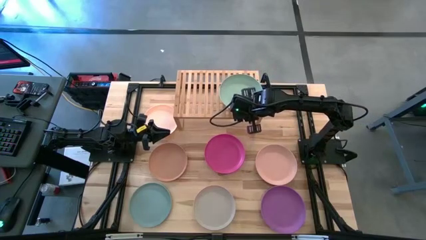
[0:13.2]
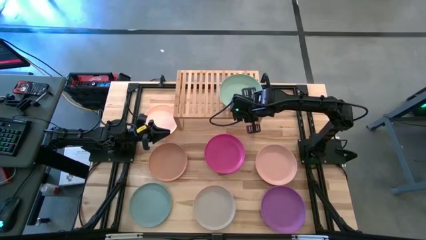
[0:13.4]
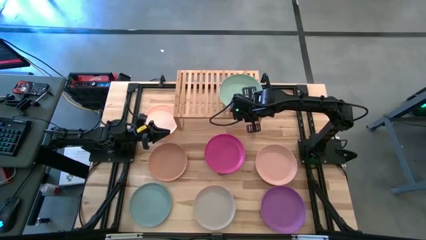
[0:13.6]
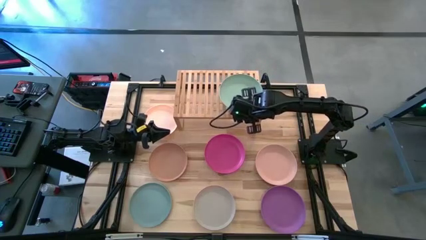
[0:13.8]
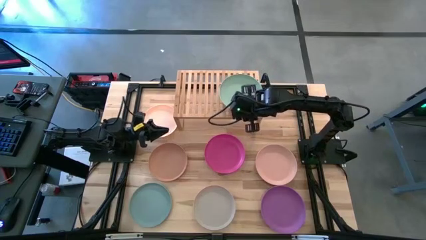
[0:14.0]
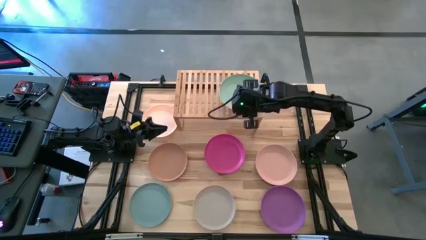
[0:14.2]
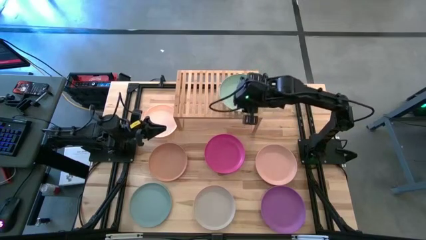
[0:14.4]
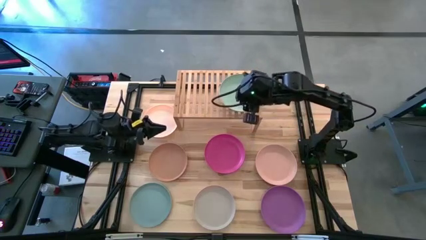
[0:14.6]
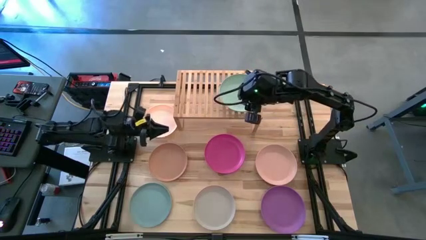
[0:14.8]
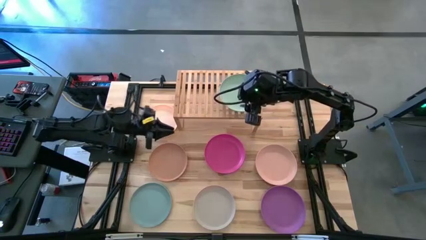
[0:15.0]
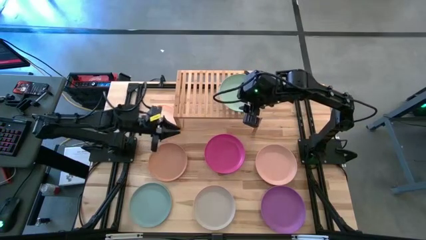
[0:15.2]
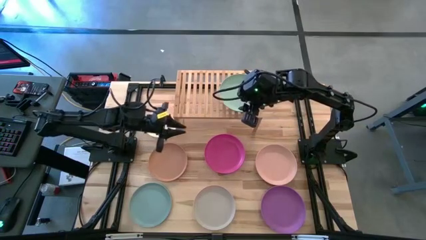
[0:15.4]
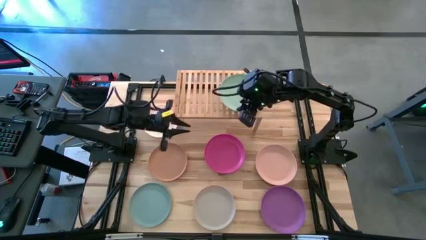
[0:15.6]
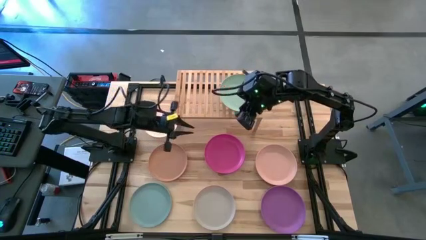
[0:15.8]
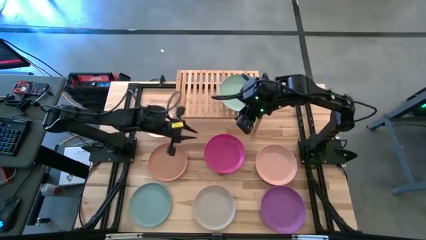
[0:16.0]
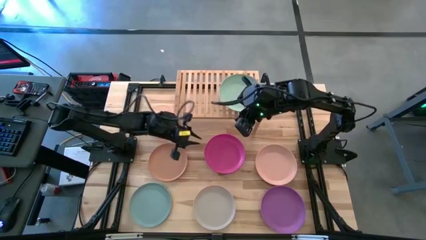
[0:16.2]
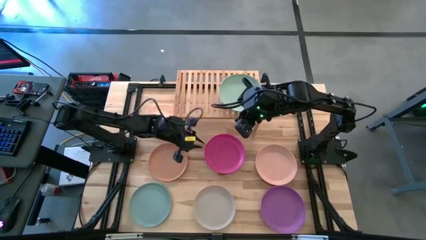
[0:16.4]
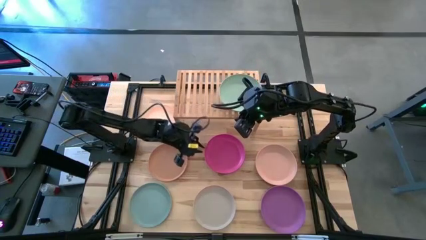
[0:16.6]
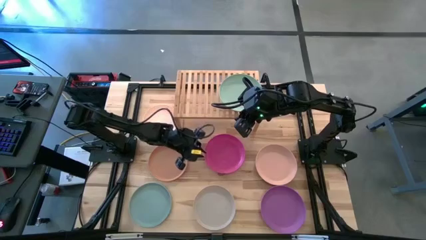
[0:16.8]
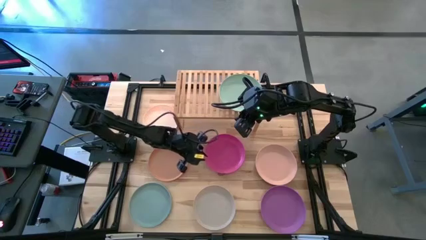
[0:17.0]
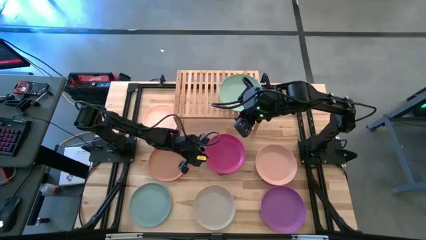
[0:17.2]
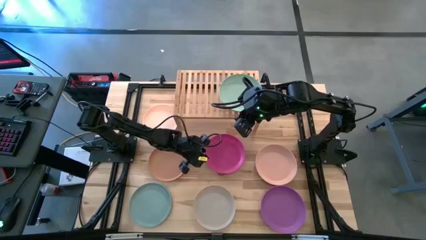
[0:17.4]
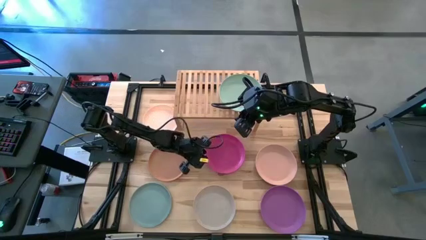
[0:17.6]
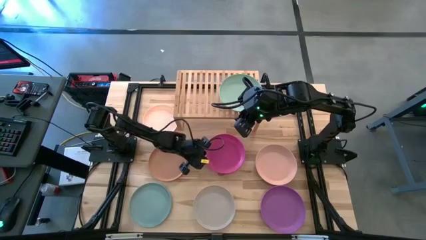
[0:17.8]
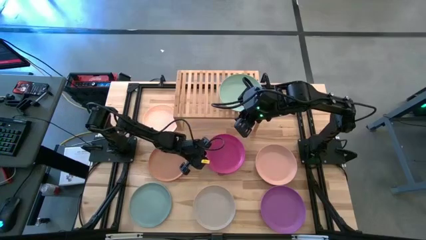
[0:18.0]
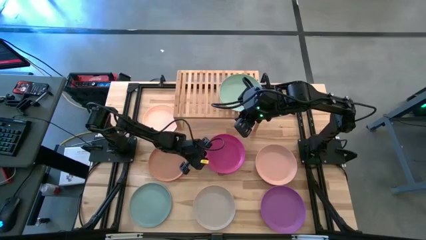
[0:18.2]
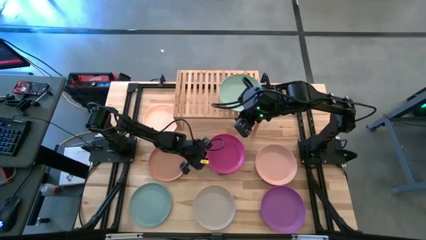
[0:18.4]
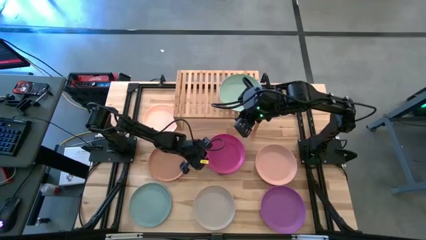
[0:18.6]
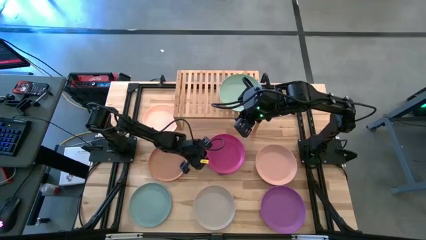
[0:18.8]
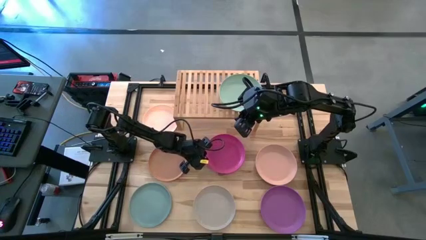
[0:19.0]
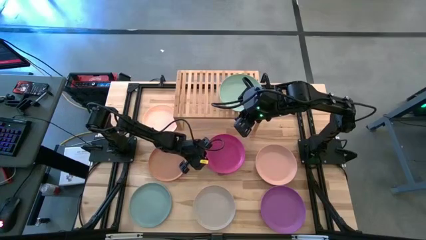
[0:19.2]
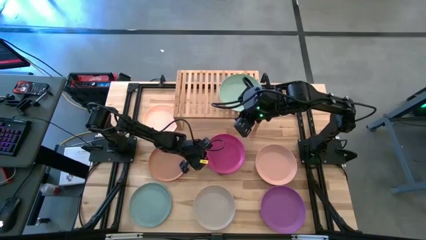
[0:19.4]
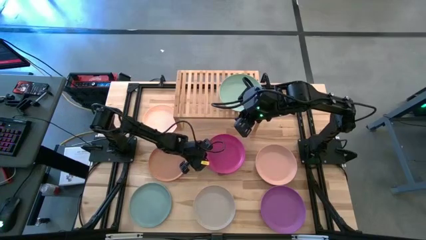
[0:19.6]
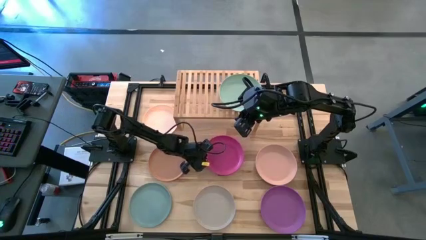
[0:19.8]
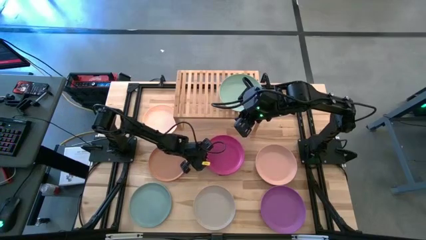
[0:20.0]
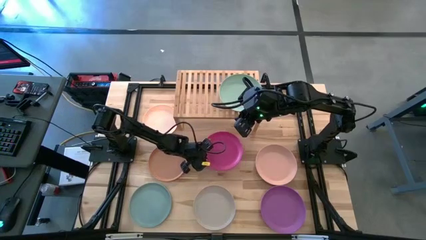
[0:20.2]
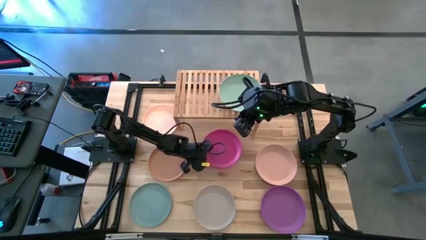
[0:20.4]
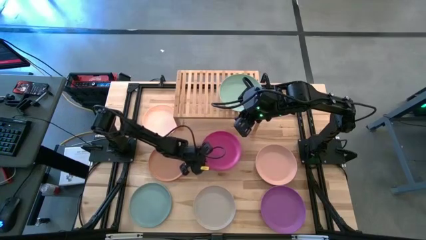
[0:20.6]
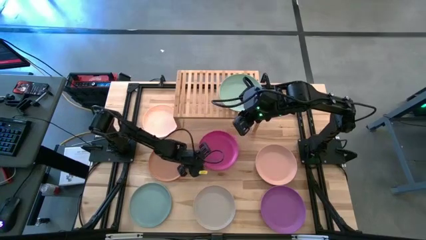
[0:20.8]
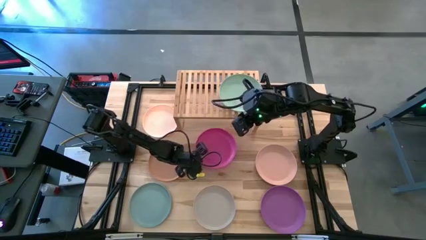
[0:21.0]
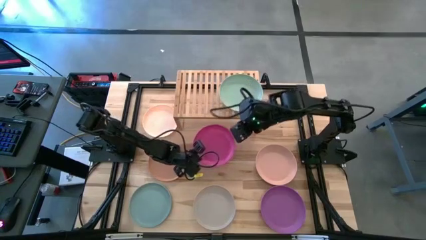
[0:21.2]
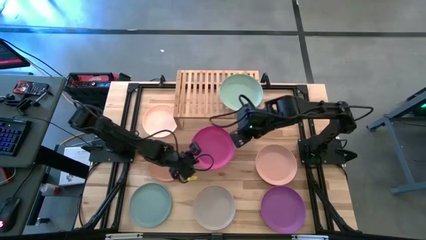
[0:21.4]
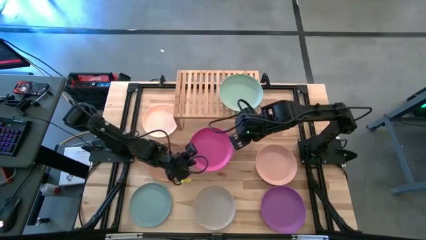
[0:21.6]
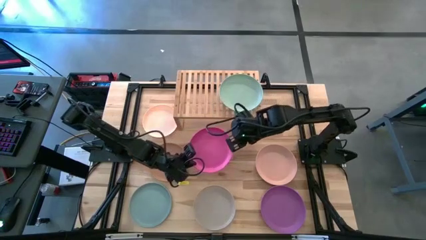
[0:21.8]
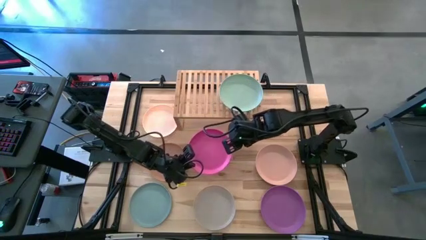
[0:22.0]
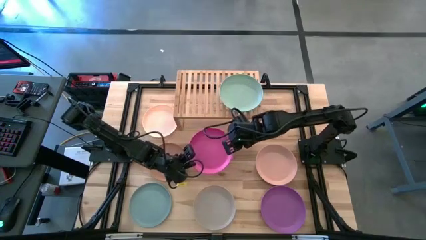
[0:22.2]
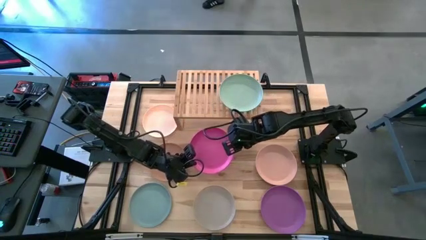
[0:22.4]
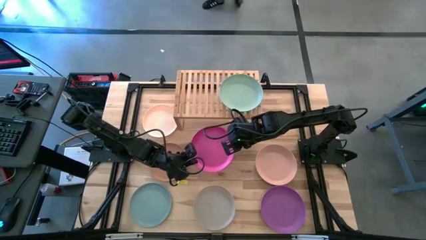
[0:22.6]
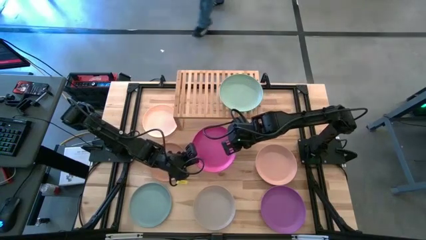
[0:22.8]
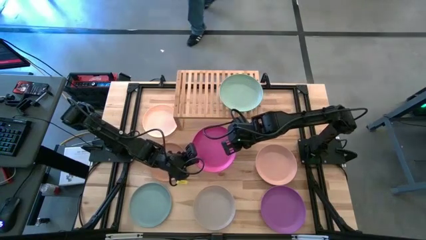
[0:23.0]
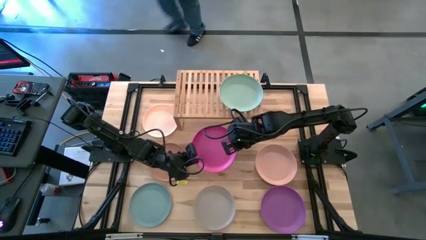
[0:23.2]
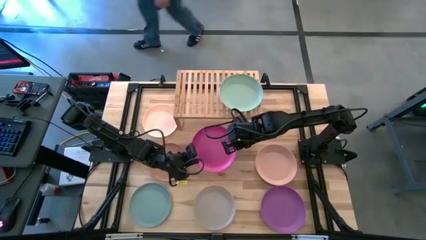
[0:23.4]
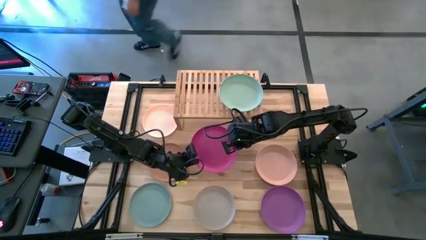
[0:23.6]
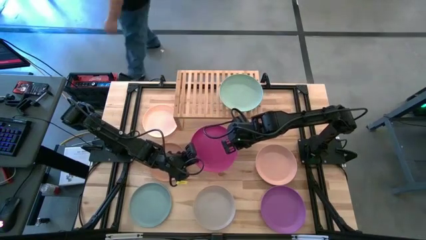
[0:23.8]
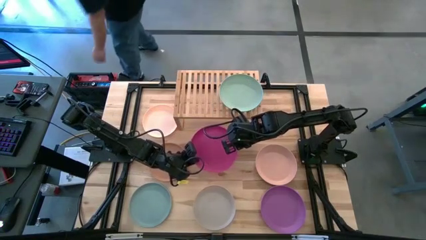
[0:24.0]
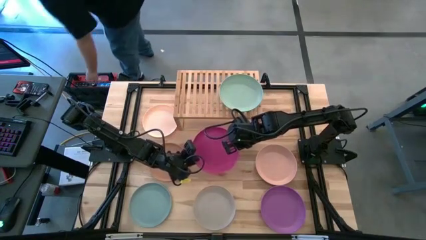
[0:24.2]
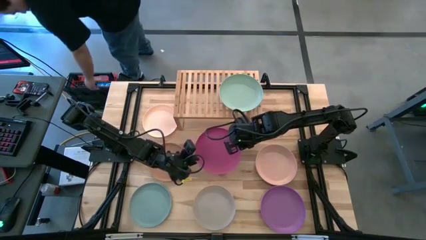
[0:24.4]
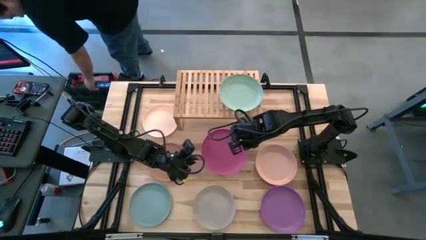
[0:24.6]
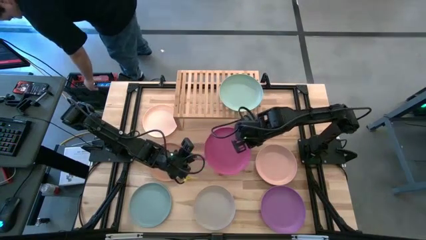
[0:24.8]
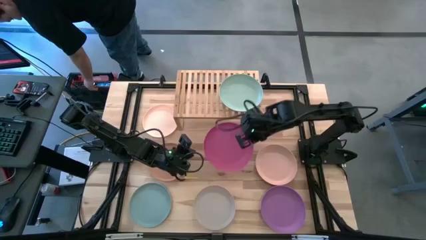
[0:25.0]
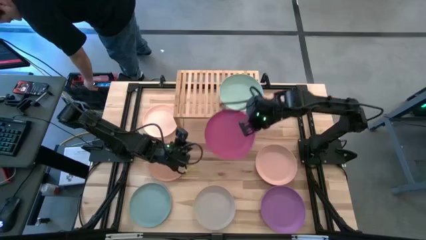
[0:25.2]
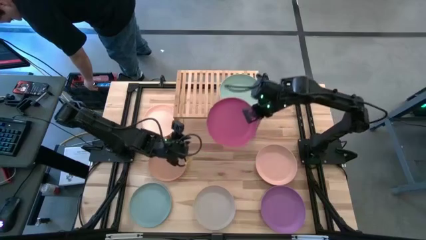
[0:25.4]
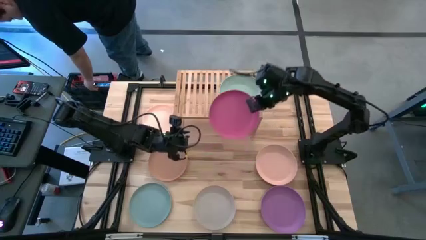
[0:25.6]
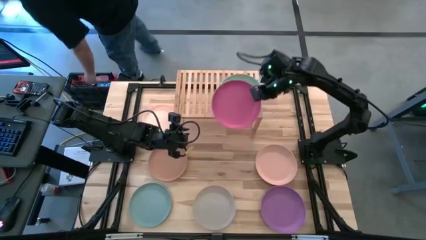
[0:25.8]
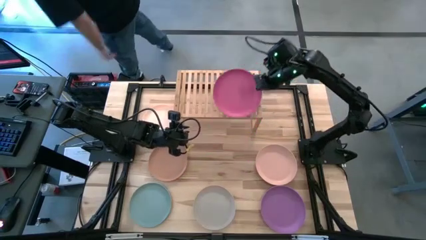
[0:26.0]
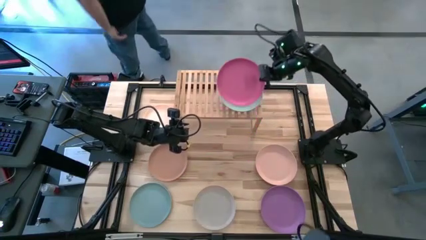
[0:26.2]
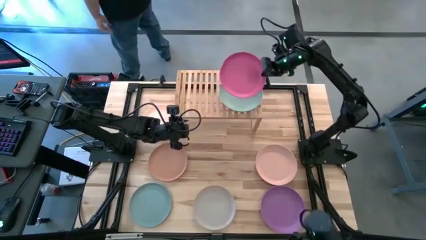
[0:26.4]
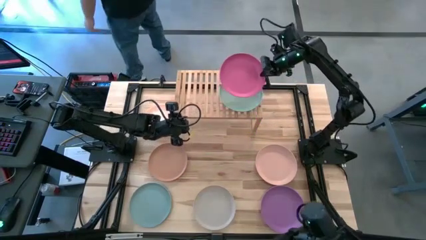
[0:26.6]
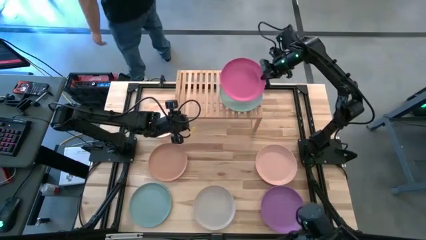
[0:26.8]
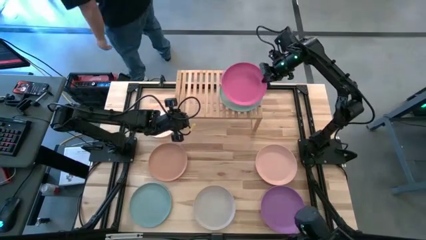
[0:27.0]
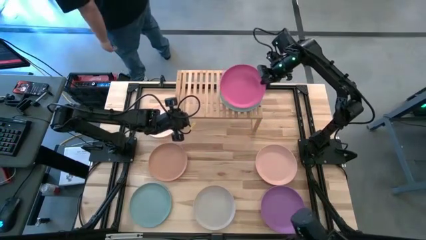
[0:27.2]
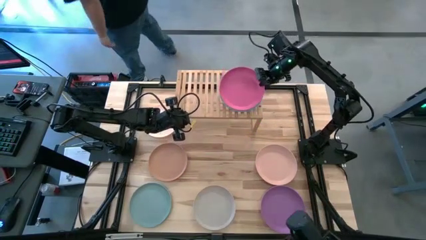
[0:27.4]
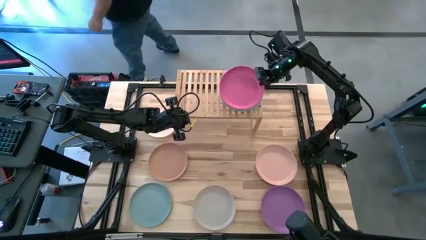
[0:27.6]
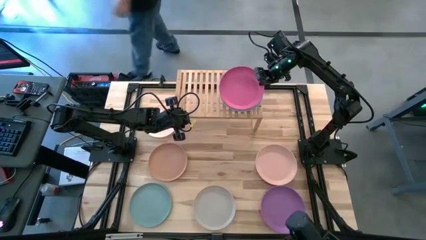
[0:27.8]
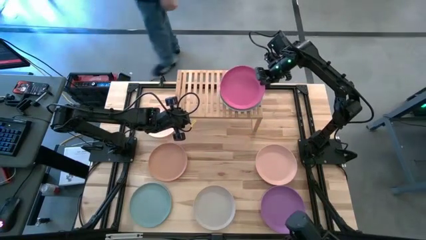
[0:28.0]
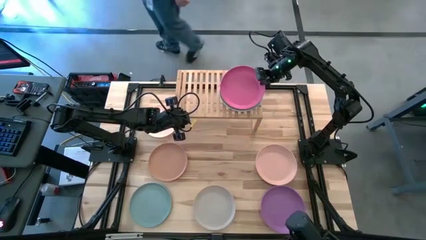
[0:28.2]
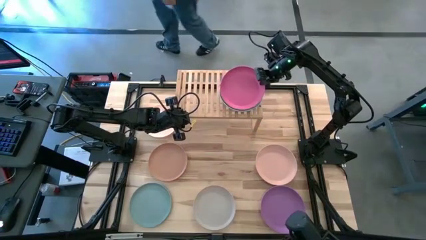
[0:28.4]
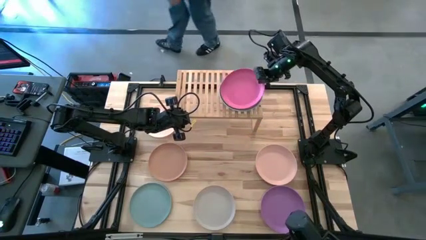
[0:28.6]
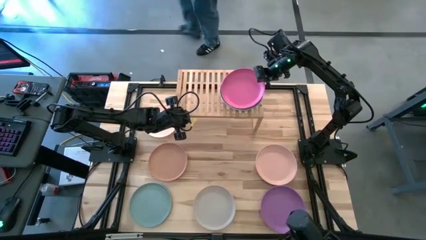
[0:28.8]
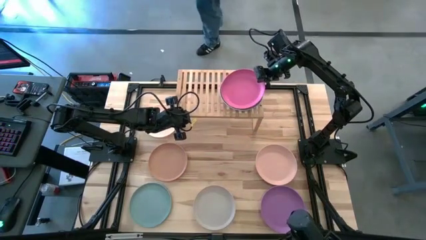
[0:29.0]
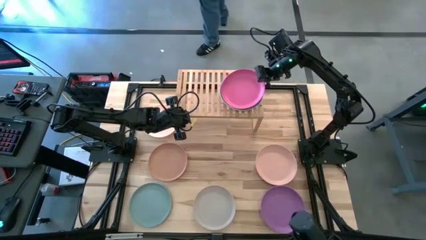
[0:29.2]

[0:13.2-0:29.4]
Task: Place and stack plates onto a shelf
Stack the pink plate on top of the green plate on the shelf
